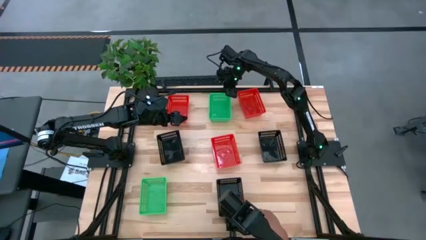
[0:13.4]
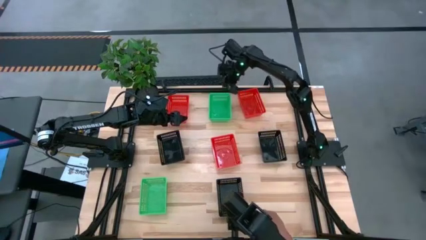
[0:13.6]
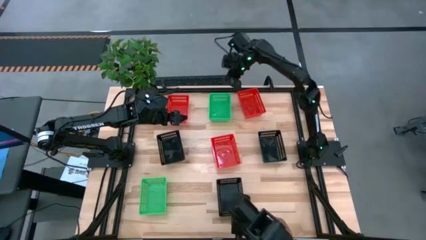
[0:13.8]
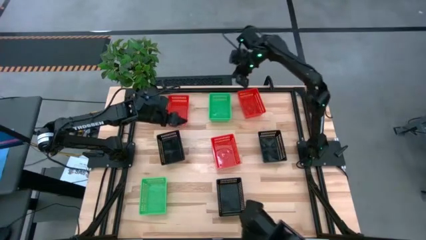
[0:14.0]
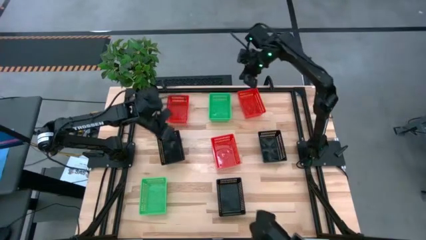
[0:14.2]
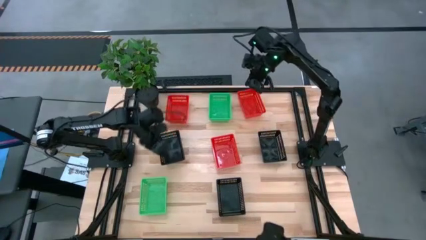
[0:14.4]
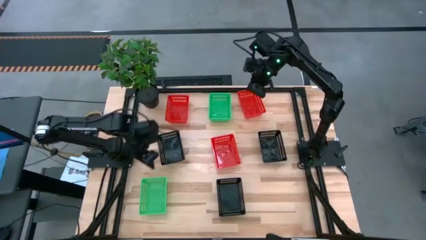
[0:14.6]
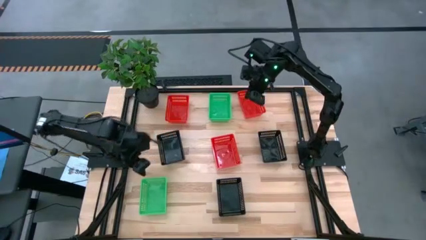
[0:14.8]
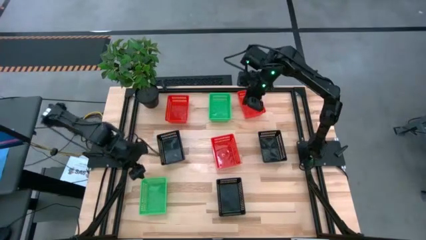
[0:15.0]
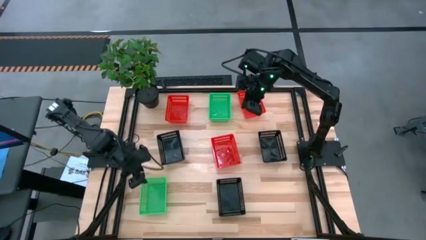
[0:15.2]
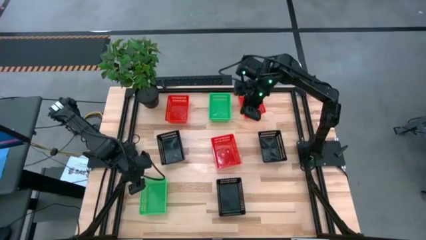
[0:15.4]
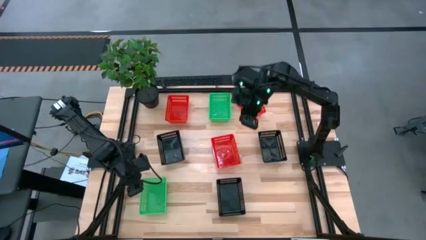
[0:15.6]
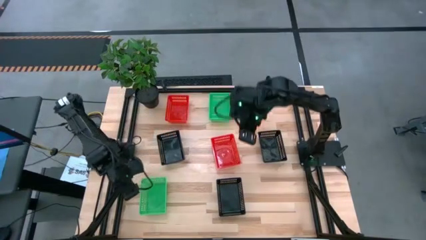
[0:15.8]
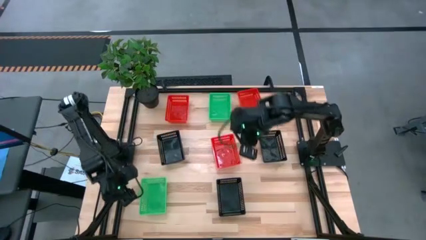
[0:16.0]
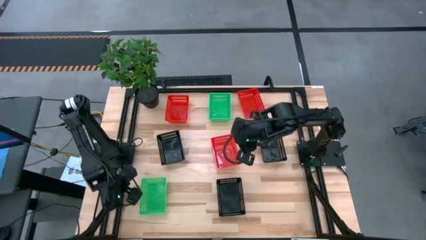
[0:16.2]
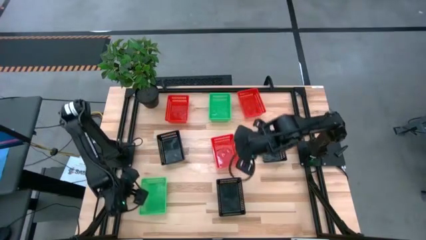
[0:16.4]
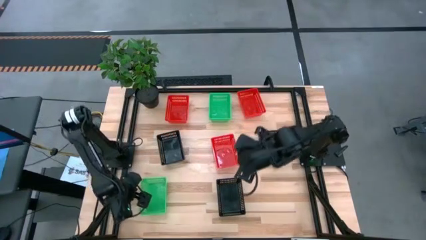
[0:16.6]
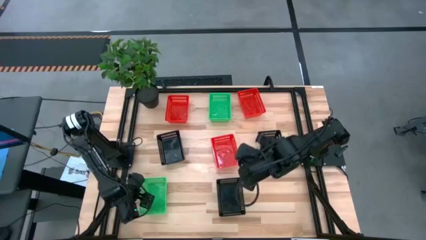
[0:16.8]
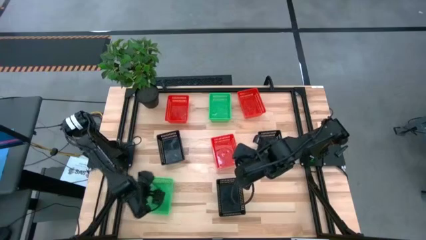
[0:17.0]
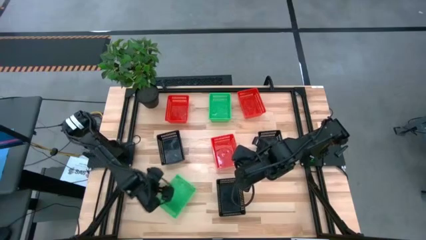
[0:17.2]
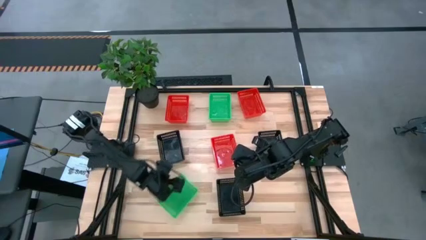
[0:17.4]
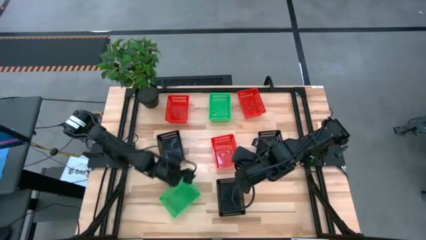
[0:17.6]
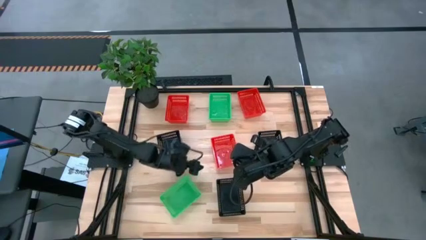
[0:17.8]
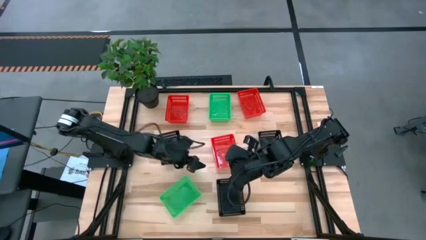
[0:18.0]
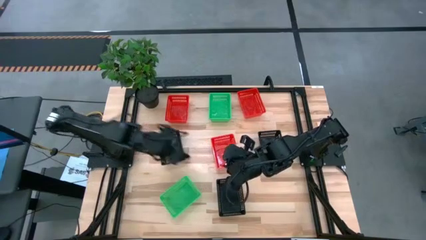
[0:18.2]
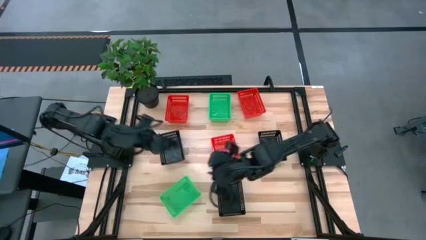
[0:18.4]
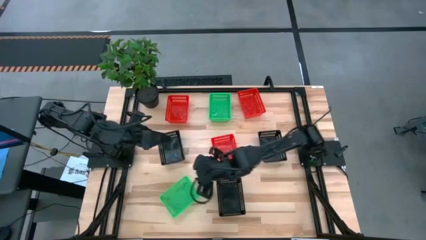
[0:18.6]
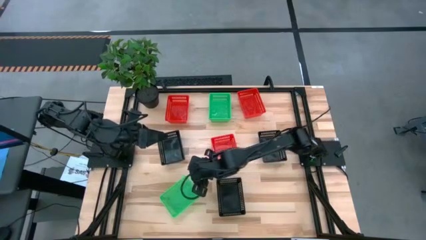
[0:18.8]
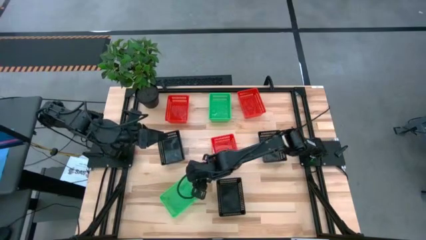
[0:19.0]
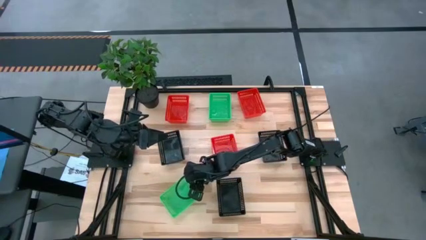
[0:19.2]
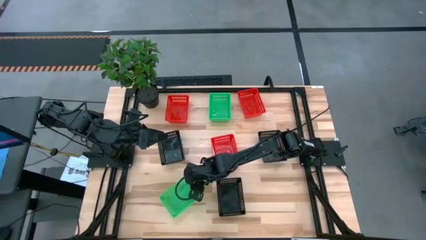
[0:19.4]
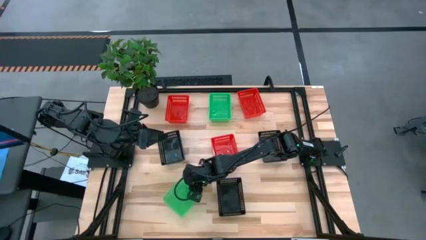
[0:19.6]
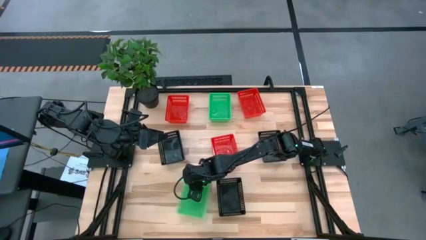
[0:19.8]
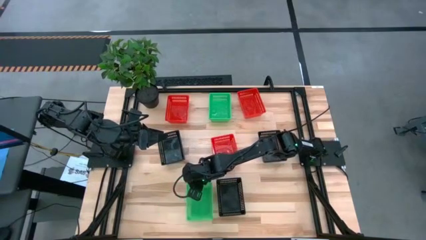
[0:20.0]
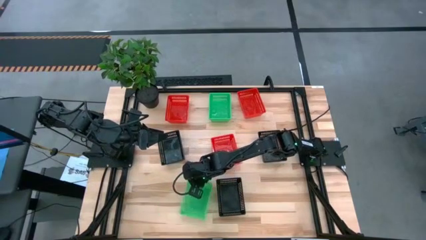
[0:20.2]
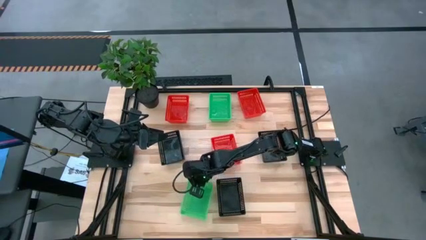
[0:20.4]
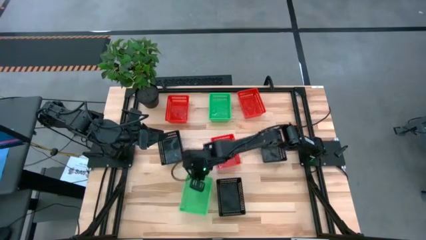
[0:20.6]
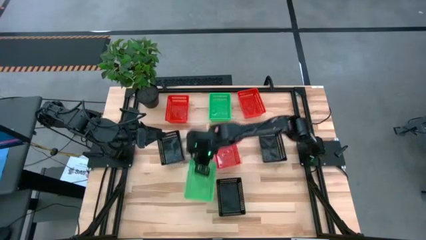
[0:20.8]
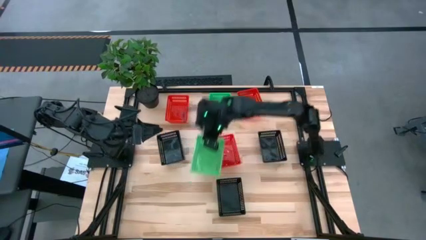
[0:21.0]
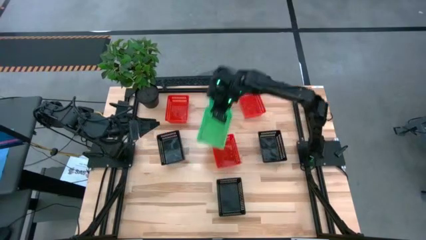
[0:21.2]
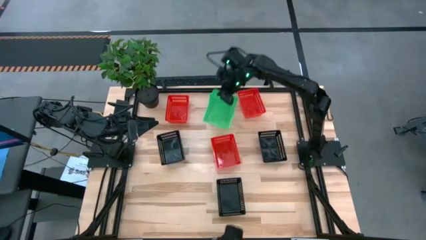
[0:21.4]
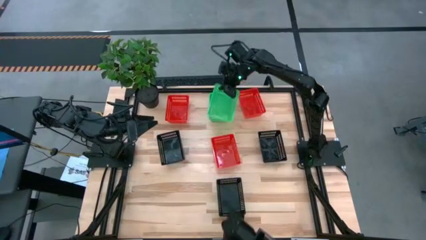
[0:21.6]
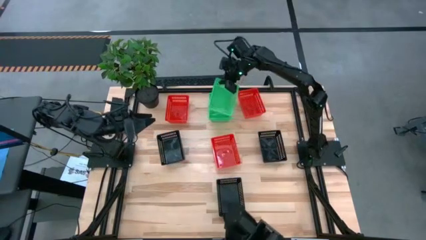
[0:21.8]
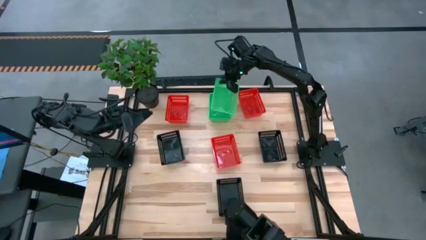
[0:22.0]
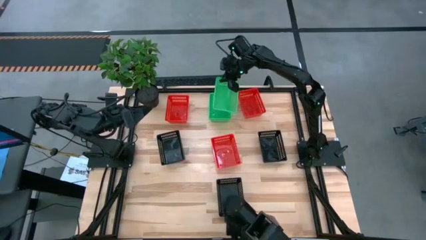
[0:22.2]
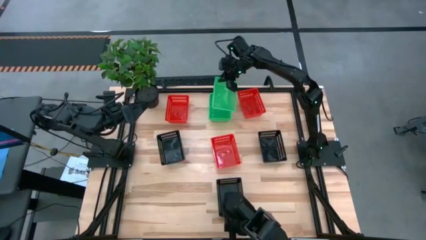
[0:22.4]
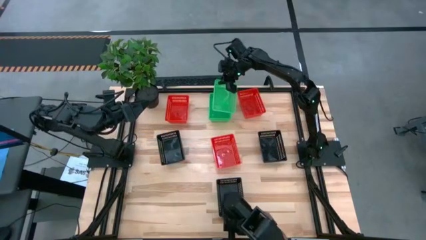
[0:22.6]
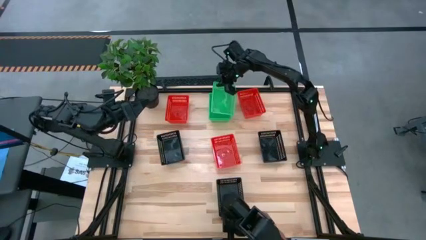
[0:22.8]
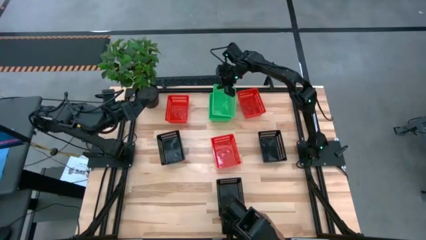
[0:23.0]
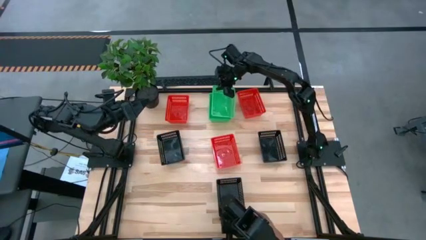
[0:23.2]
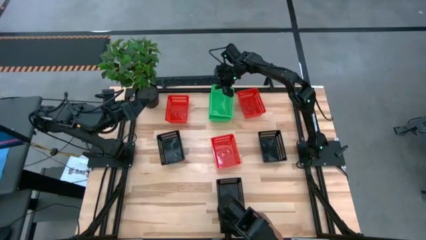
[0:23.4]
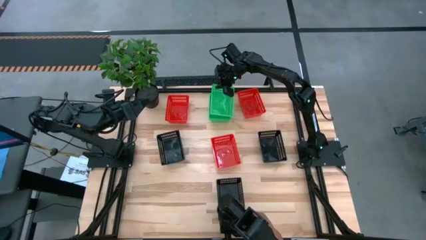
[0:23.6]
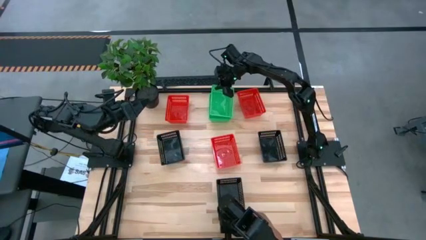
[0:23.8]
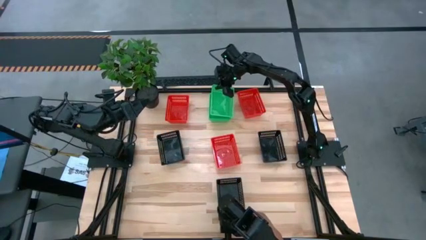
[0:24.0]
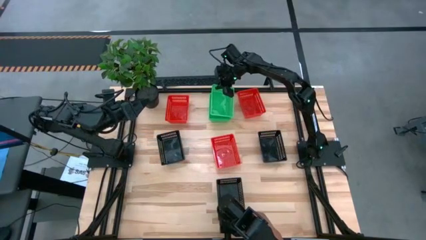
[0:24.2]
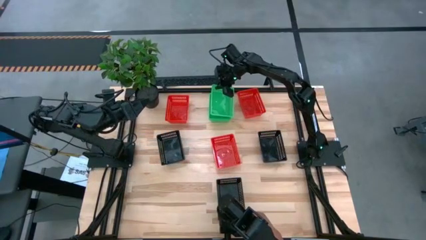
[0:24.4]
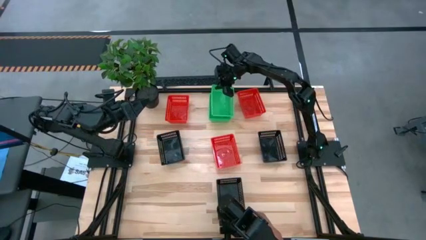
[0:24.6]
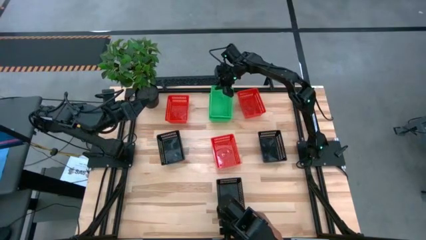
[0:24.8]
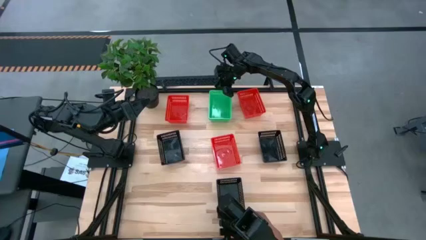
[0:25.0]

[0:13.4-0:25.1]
Stack the bottom green bin on the stacked green bins

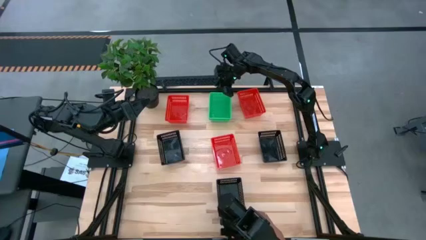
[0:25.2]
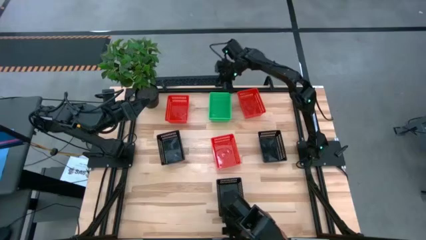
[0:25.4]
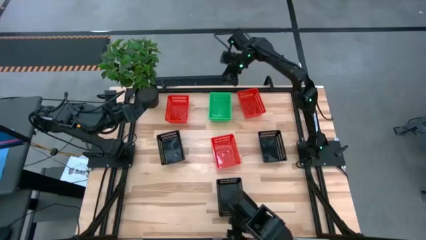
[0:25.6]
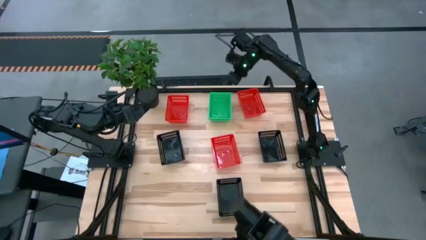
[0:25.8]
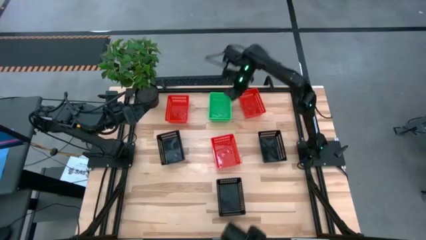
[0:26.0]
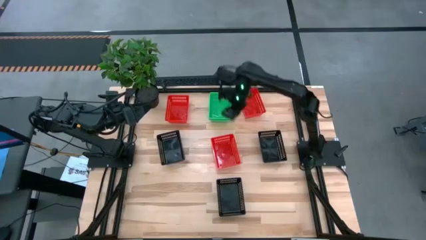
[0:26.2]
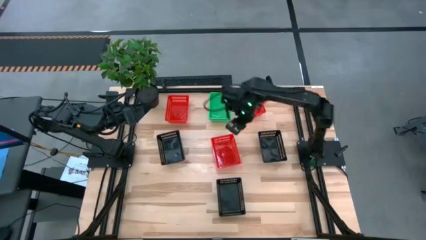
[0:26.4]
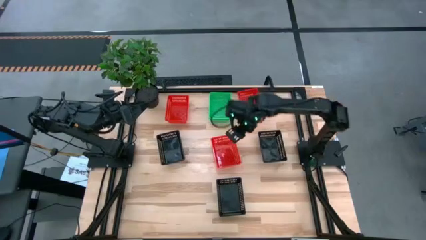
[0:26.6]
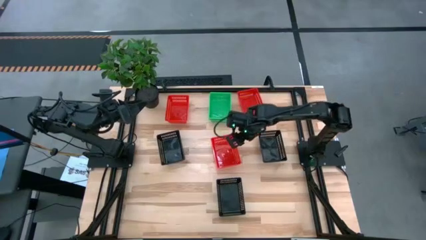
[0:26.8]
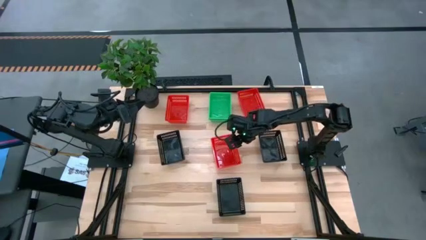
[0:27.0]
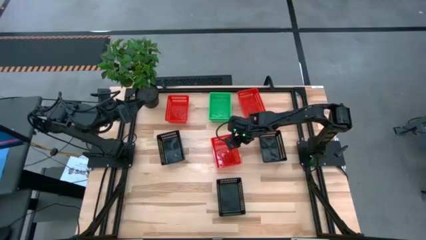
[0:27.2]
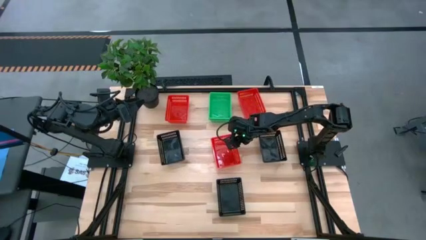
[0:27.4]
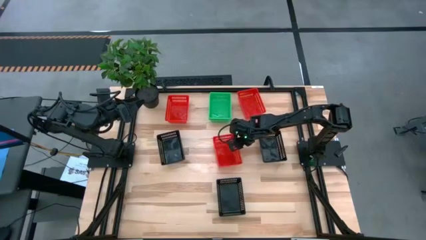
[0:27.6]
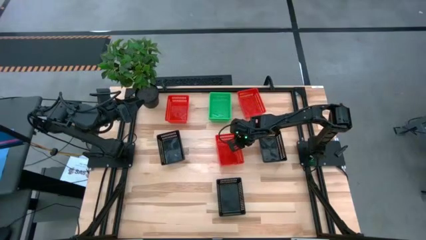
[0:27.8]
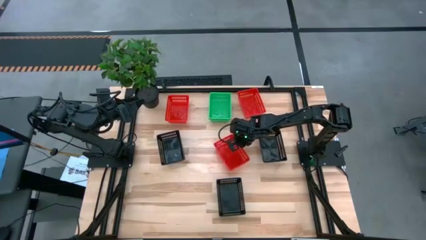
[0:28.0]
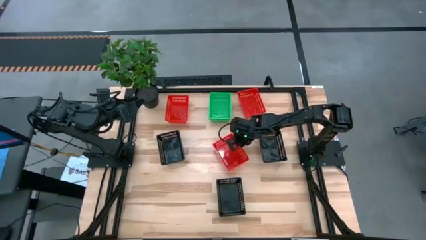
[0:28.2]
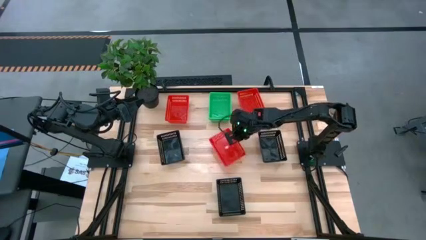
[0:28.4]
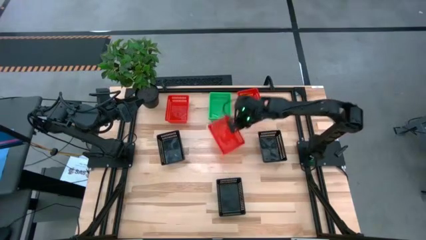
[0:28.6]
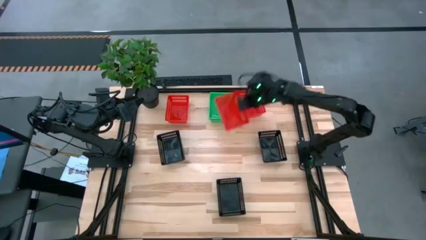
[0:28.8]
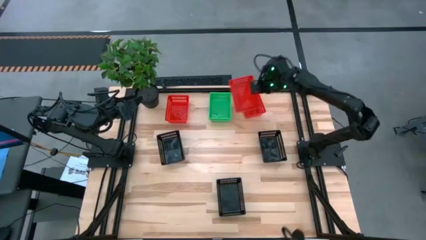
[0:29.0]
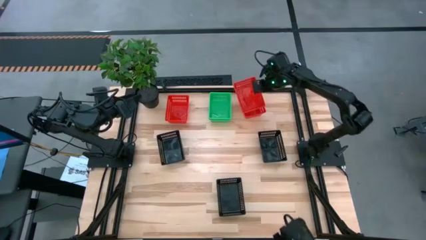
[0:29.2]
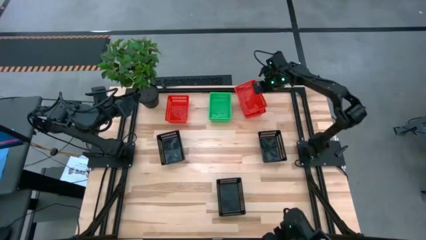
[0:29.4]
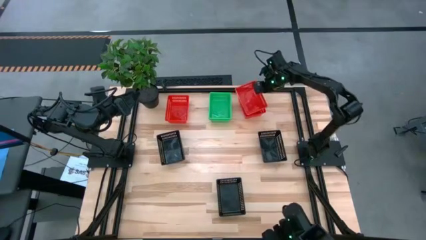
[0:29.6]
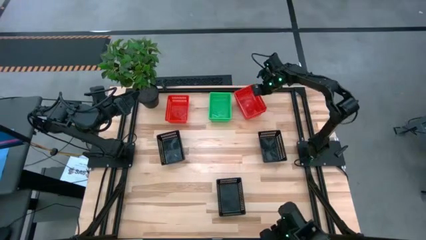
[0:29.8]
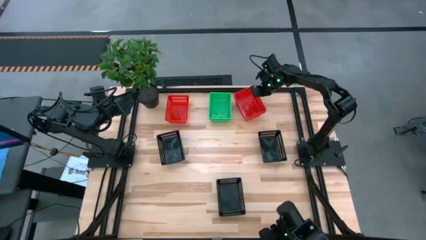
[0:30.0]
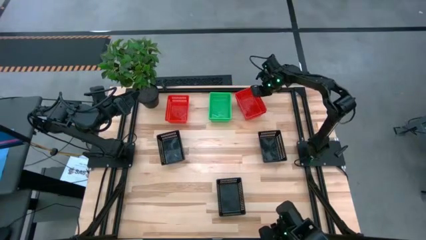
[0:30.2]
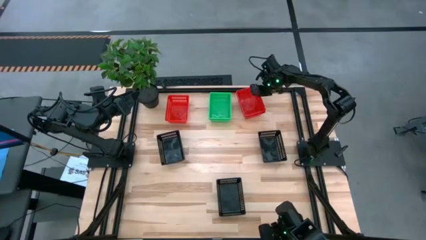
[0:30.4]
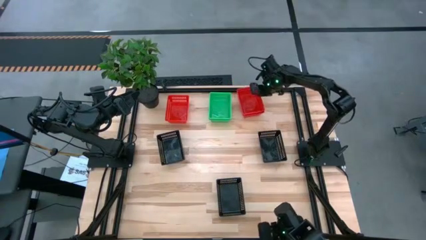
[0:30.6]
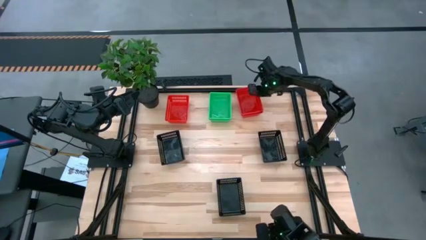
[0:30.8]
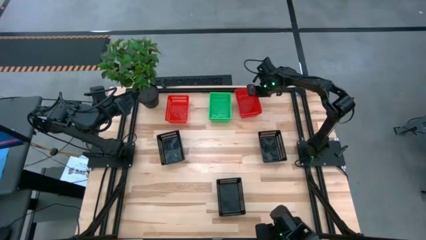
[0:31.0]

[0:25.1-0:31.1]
Stack the bottom red bin on the top right red bin
